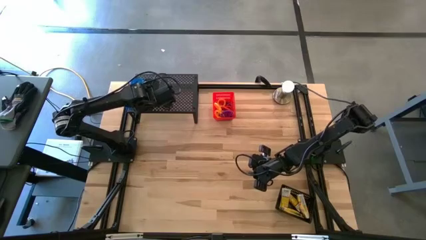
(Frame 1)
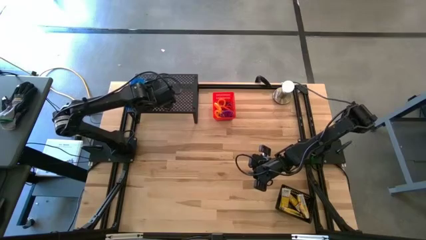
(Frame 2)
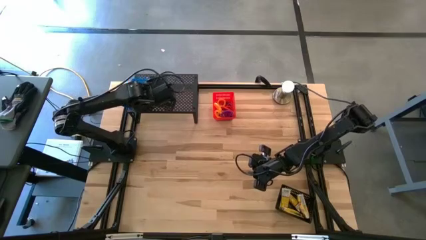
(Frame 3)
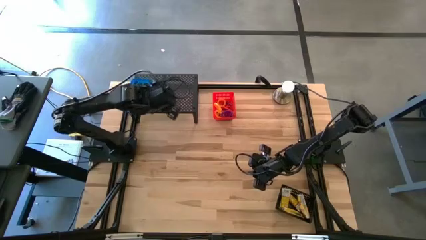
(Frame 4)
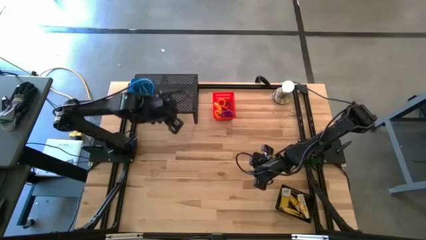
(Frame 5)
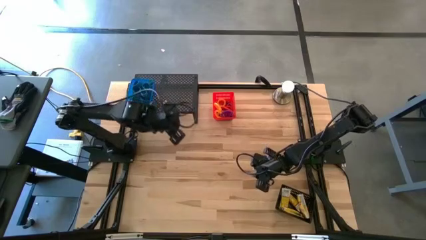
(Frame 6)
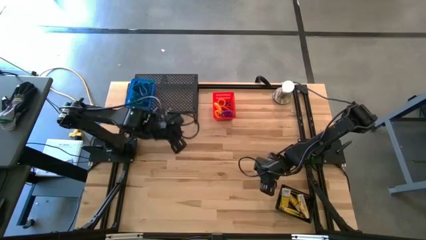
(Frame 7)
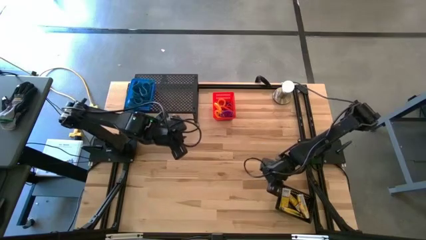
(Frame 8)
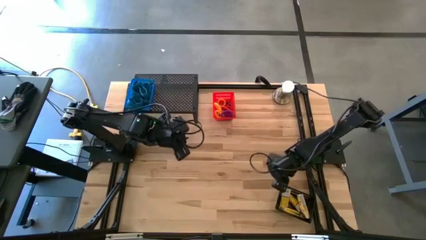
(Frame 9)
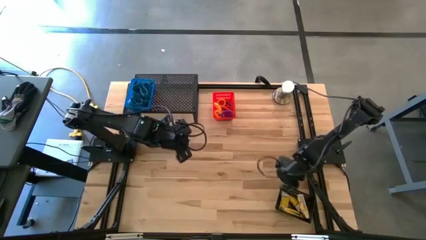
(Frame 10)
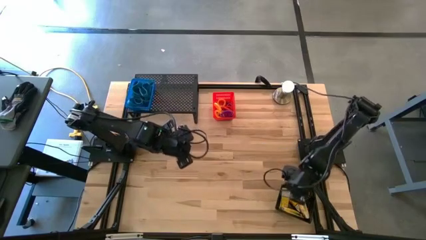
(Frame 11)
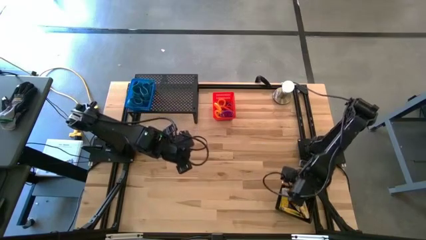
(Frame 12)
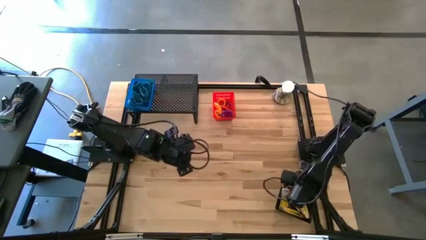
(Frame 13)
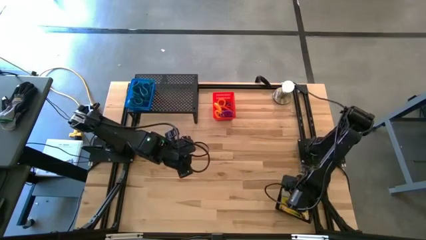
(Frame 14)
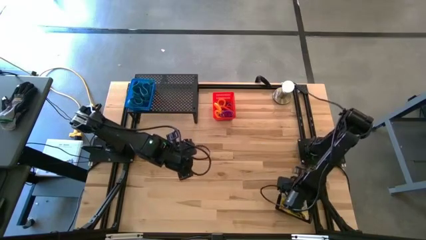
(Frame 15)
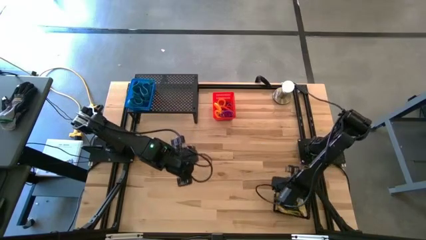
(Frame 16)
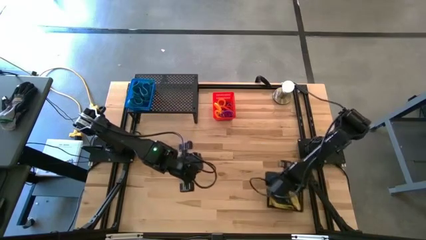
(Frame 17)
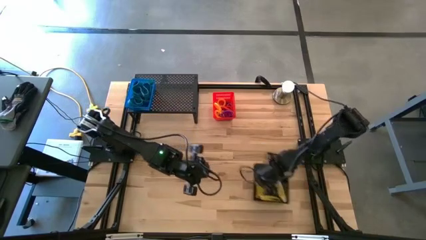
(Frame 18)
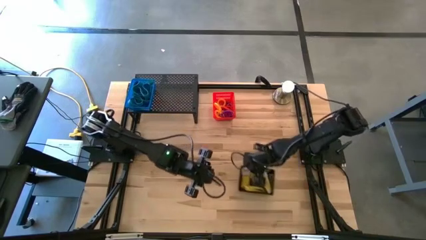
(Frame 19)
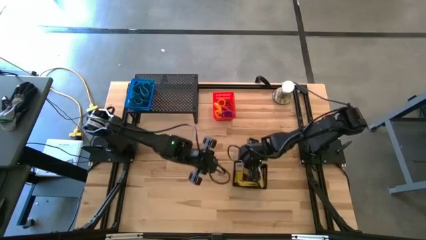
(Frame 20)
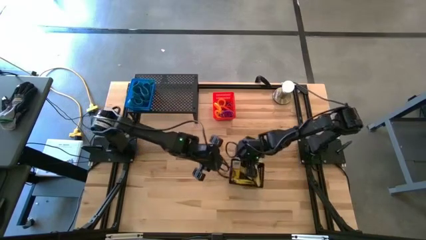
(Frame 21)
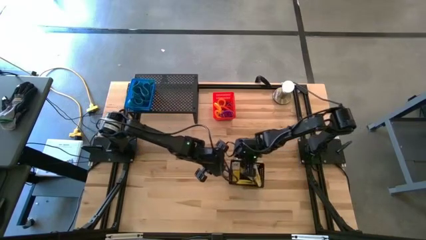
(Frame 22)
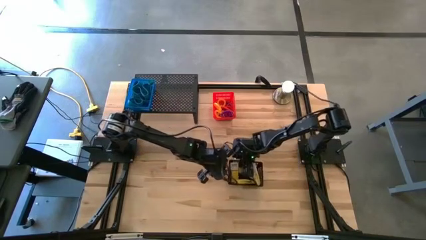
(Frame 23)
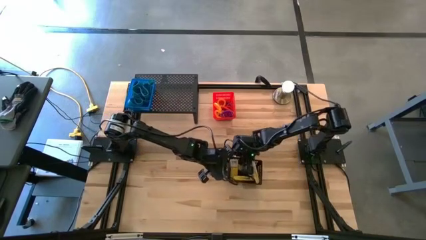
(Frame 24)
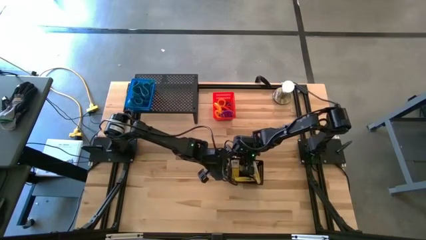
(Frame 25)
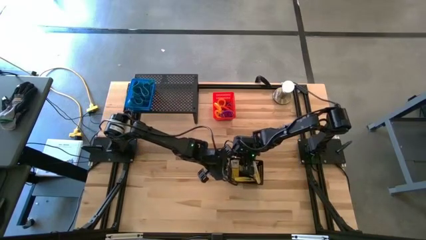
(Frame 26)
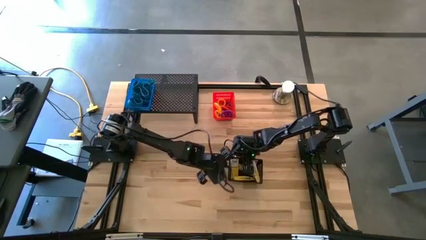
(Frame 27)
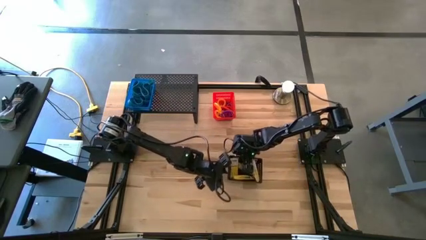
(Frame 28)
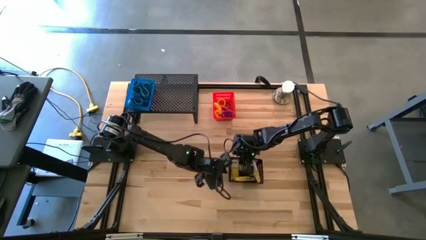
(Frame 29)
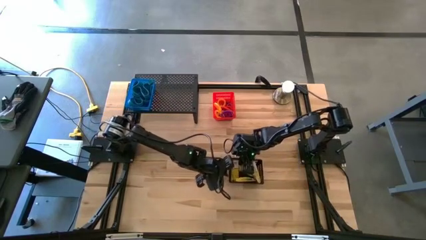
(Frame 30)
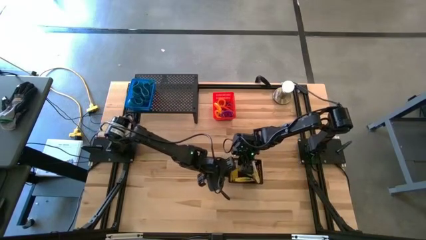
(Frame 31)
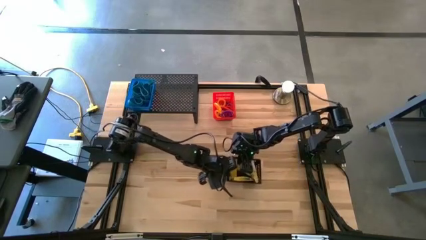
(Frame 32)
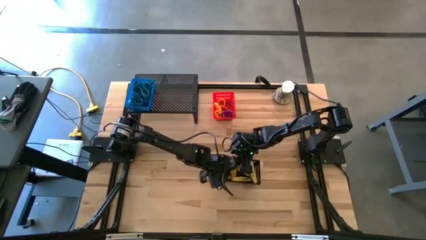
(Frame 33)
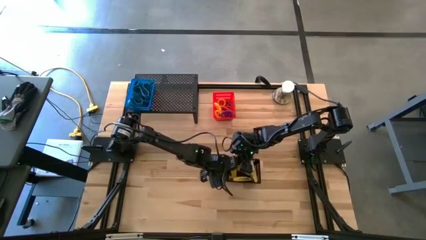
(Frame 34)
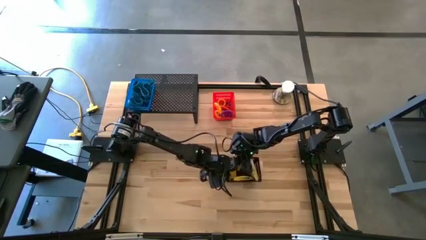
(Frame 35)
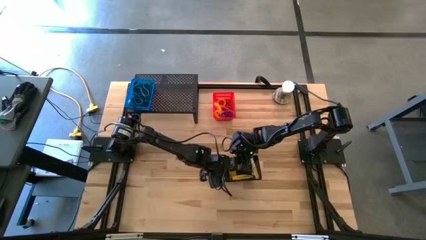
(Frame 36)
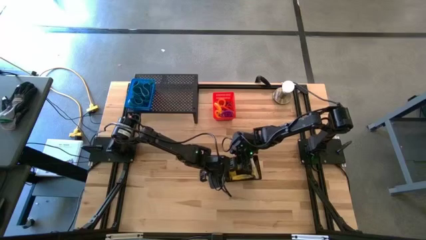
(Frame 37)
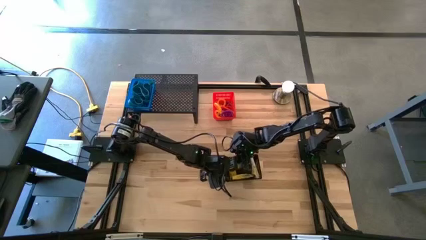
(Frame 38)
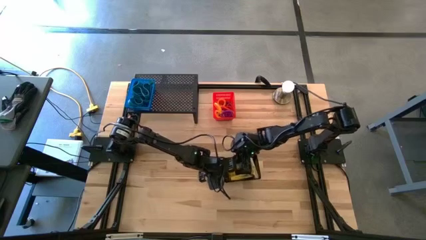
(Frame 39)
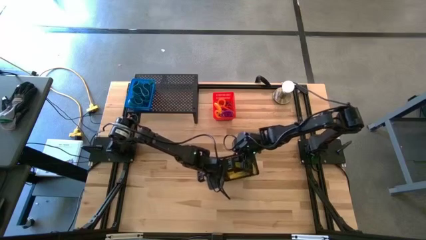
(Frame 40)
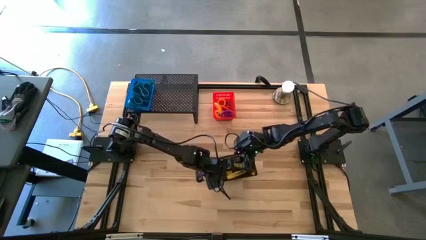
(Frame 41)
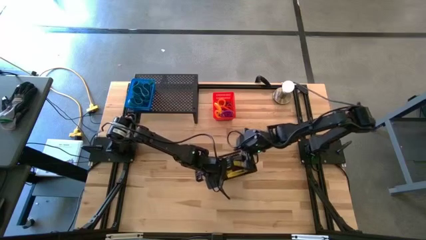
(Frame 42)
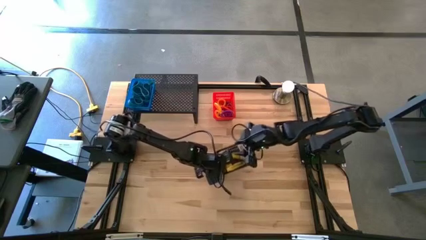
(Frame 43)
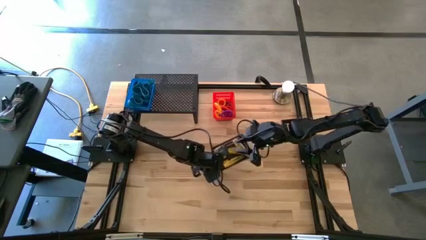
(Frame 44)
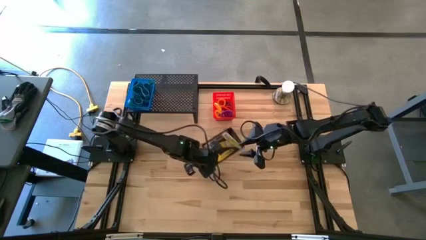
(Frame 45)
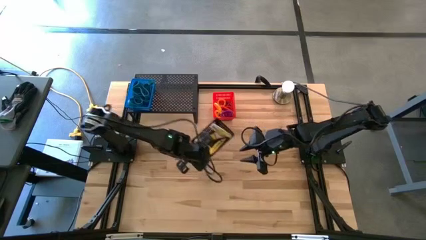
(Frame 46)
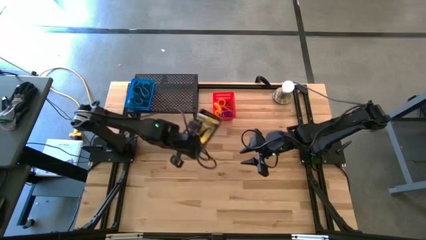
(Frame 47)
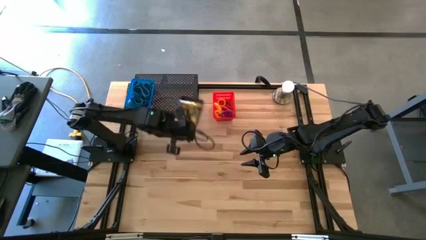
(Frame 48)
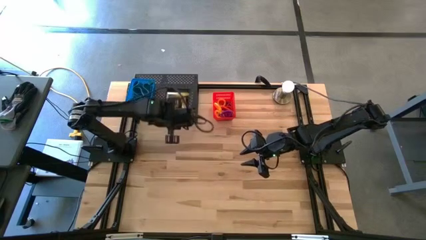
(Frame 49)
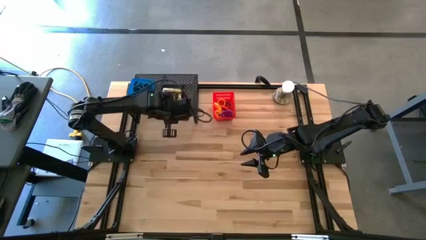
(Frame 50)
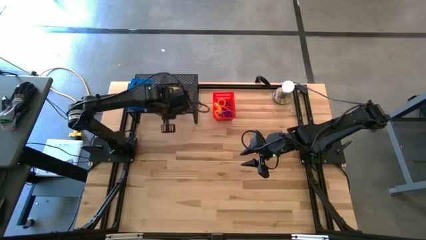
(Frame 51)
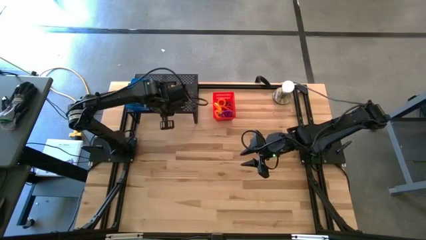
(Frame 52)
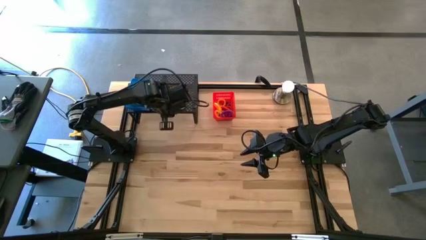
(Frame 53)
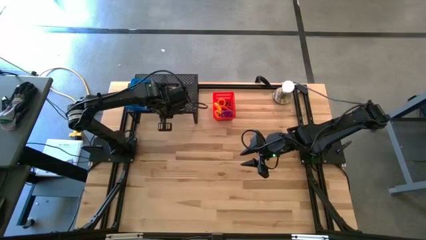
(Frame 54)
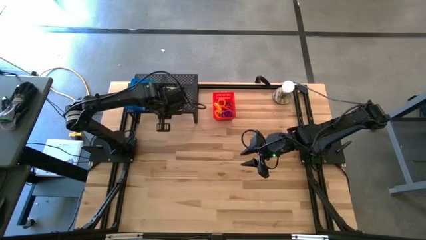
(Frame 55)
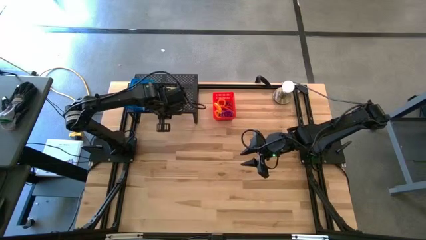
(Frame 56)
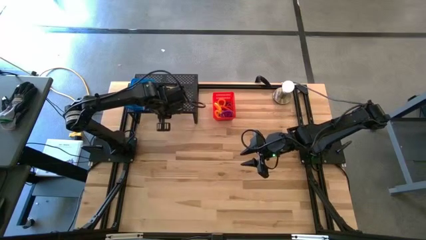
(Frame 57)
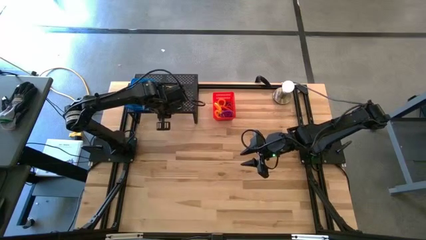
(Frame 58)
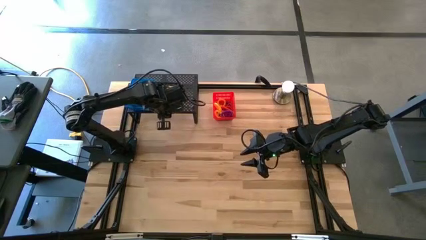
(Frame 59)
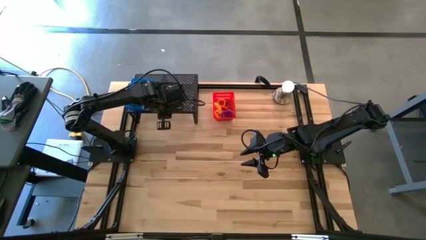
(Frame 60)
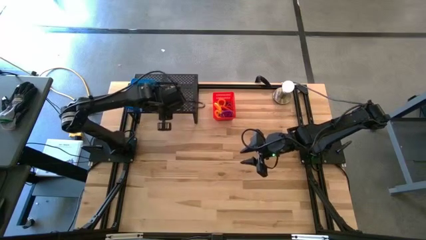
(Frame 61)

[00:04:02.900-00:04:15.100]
Task: Pick & Place Office Desk Supplies
Put the black bin containing the crayon boxes on the shelf

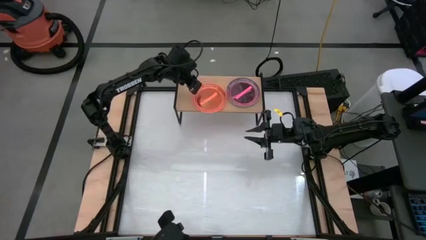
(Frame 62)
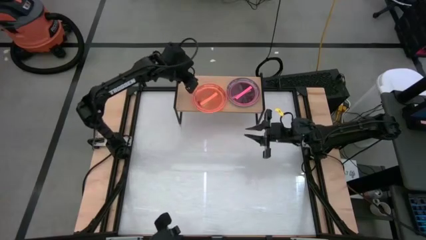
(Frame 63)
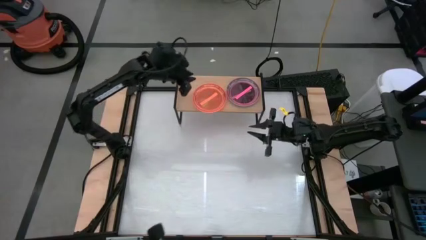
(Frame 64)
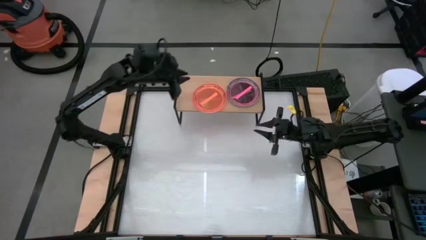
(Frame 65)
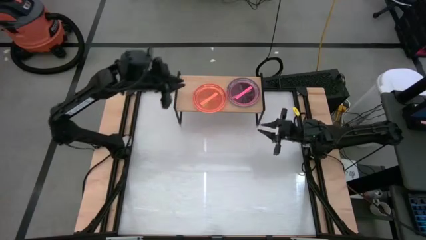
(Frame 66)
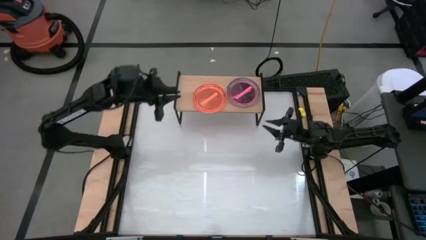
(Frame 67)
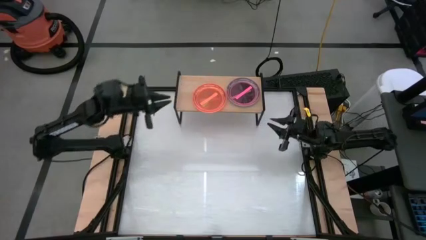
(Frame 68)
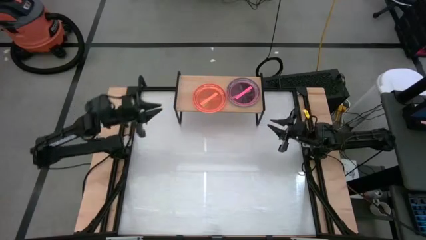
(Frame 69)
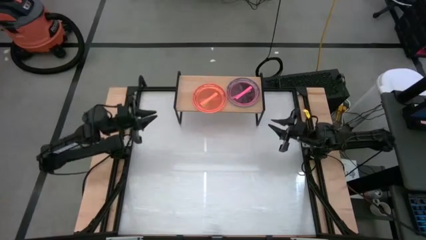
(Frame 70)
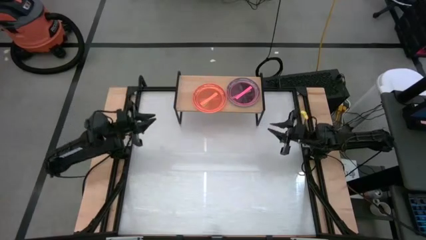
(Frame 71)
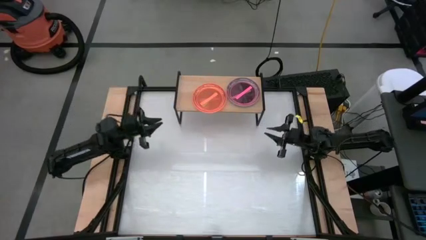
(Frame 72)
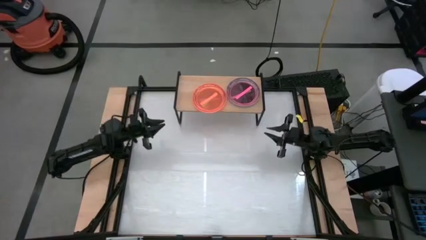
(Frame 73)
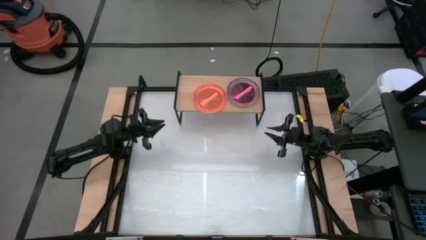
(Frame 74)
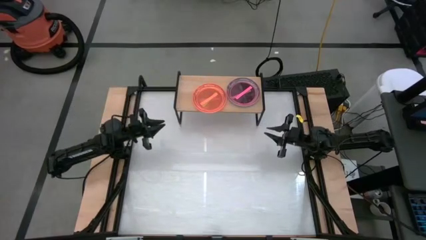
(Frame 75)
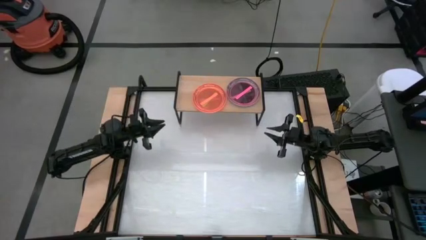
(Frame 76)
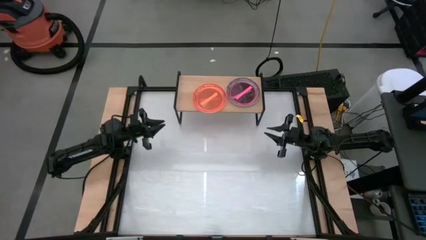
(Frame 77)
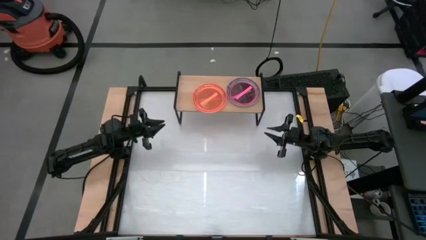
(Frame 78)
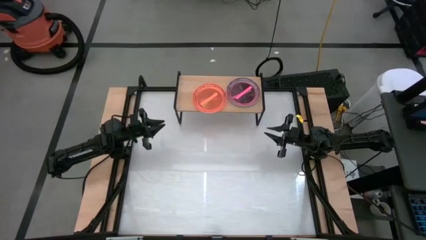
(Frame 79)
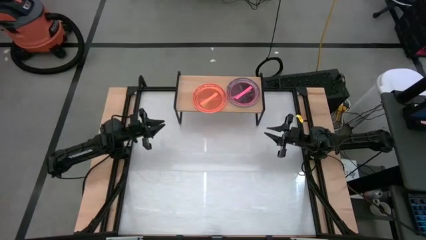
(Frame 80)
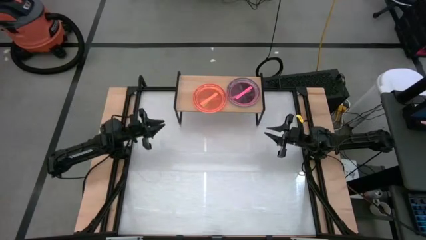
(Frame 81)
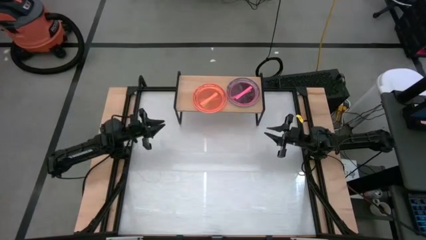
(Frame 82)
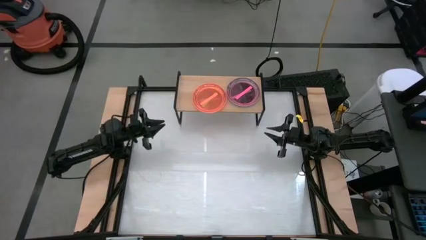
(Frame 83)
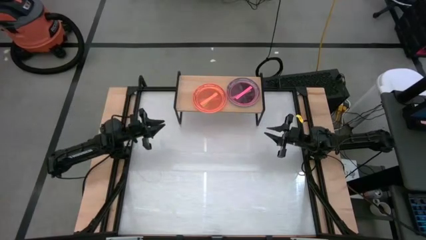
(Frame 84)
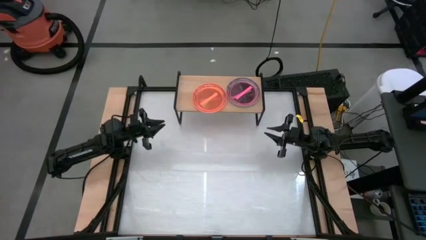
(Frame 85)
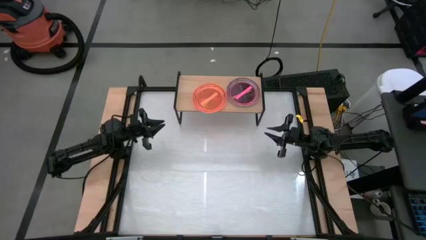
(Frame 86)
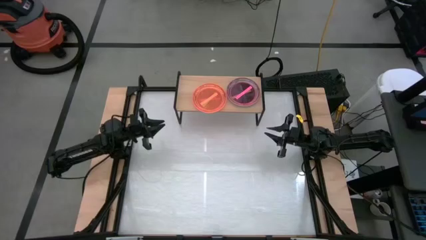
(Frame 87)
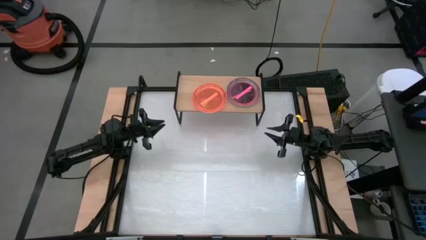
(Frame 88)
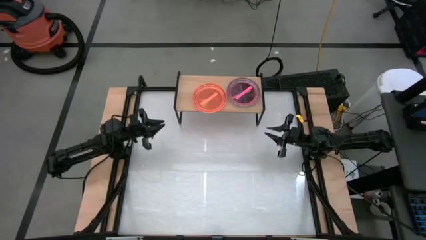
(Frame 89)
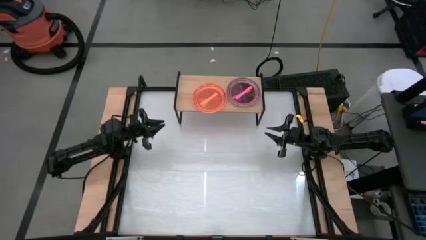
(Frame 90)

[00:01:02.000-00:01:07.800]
Task: Place and stack plates onto a shelf
Return to Home Position
